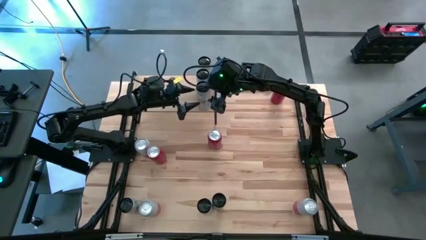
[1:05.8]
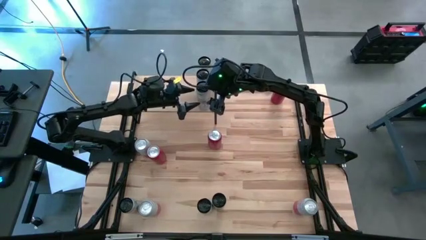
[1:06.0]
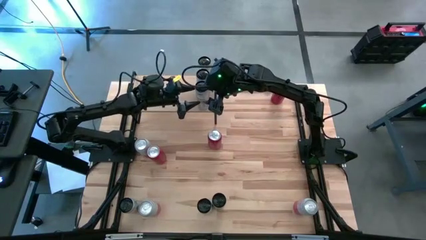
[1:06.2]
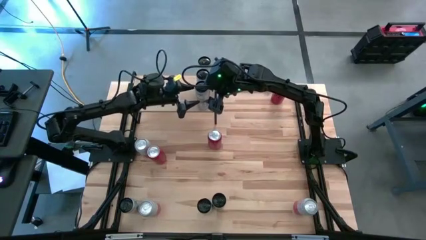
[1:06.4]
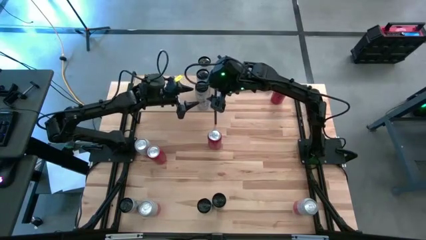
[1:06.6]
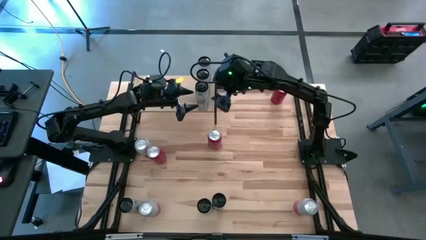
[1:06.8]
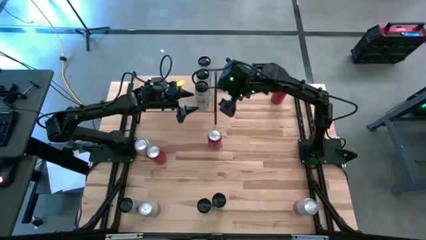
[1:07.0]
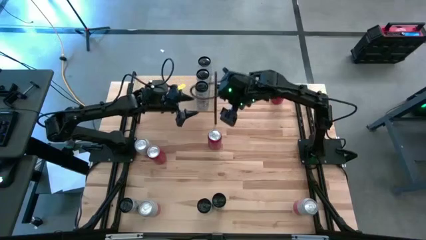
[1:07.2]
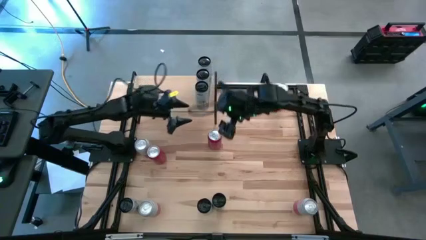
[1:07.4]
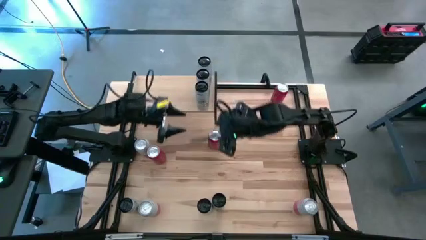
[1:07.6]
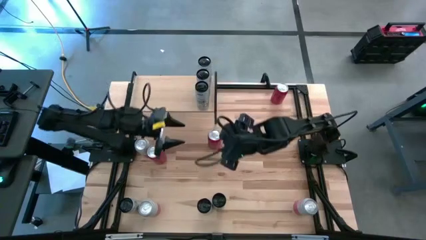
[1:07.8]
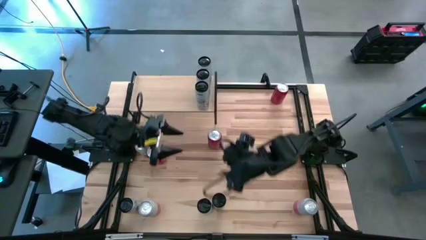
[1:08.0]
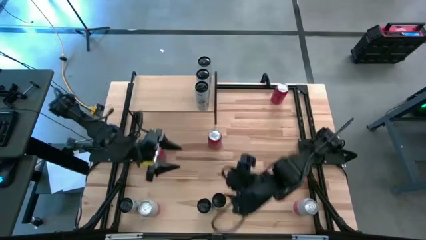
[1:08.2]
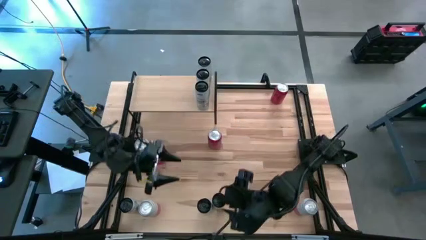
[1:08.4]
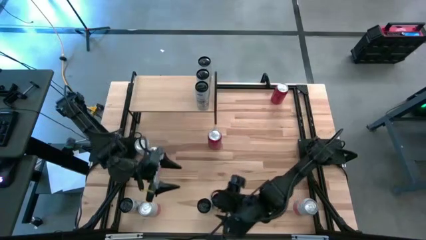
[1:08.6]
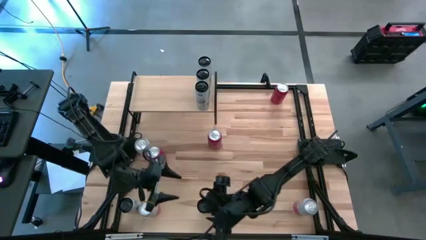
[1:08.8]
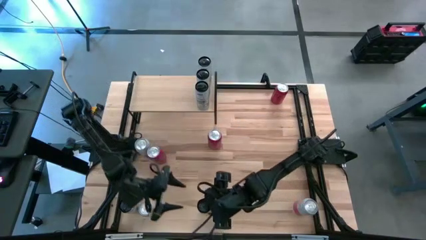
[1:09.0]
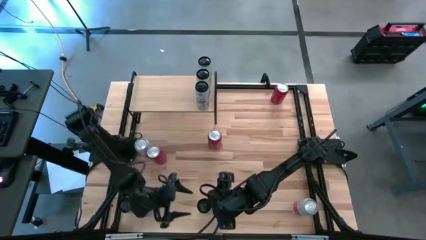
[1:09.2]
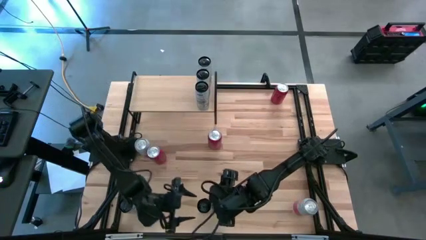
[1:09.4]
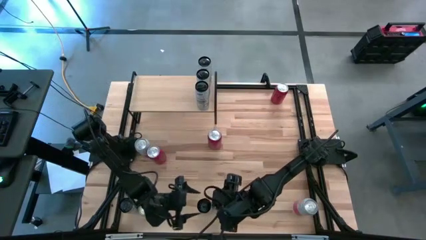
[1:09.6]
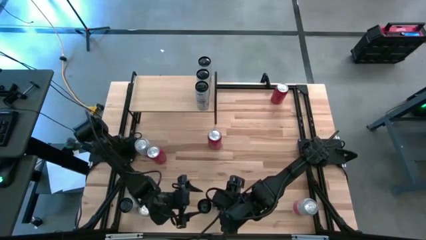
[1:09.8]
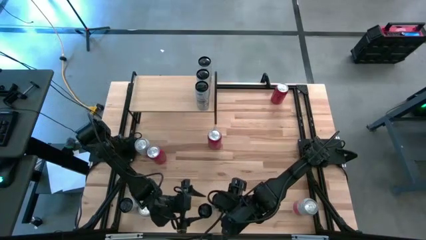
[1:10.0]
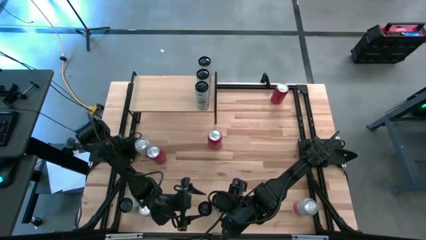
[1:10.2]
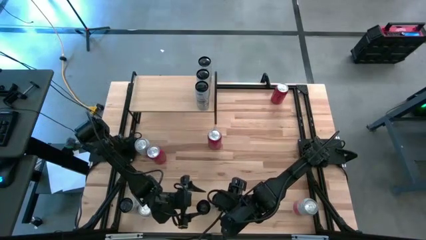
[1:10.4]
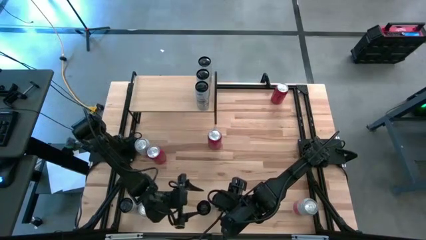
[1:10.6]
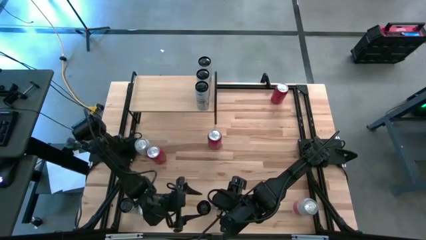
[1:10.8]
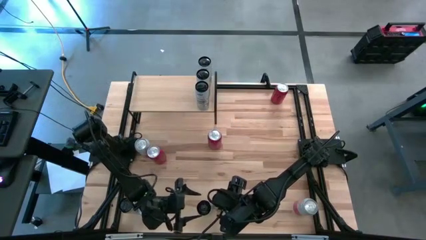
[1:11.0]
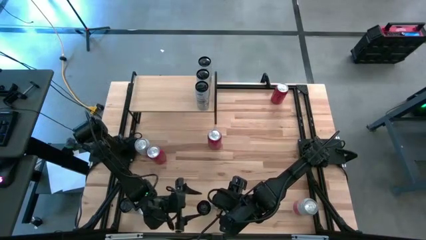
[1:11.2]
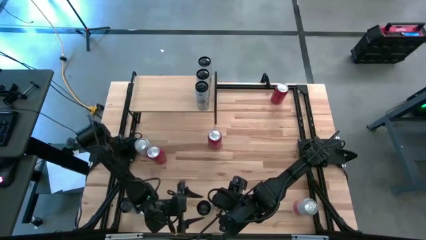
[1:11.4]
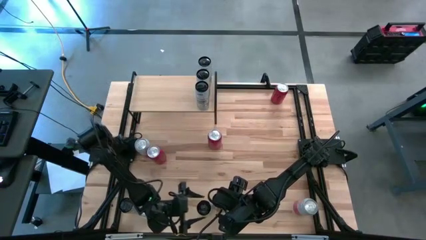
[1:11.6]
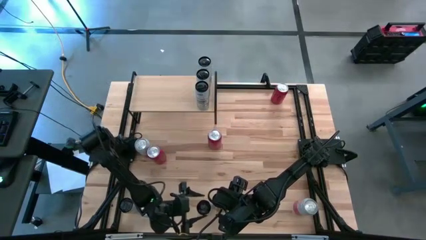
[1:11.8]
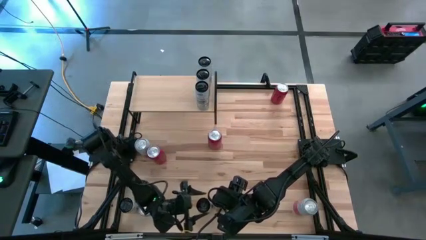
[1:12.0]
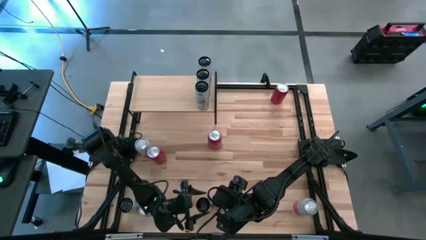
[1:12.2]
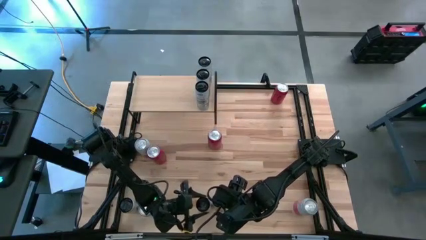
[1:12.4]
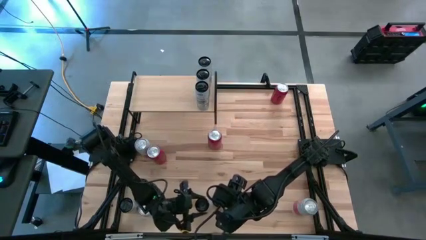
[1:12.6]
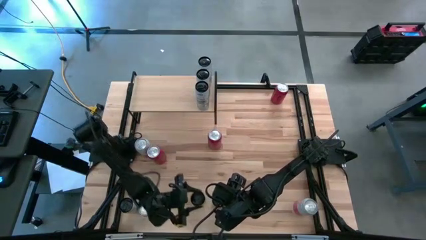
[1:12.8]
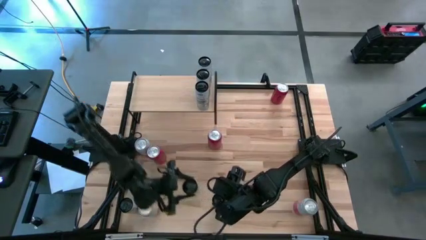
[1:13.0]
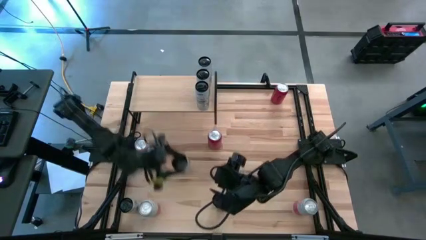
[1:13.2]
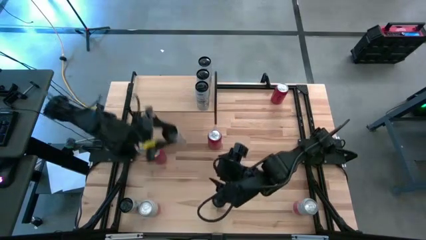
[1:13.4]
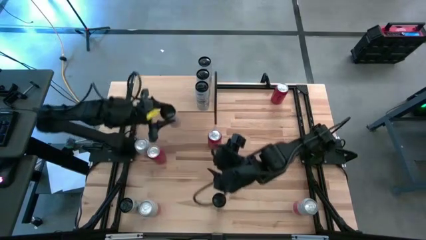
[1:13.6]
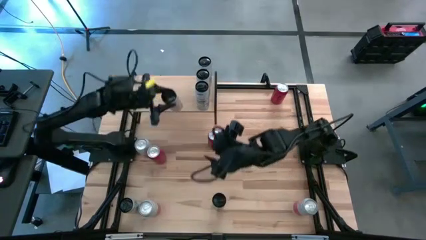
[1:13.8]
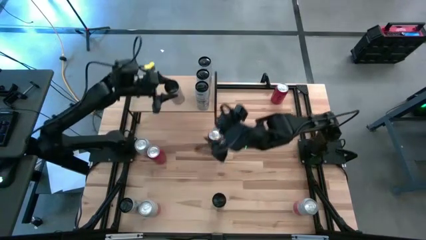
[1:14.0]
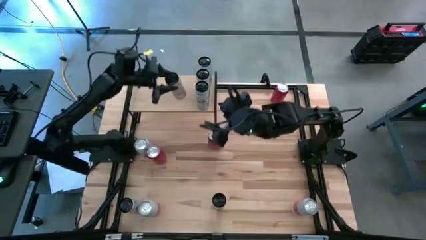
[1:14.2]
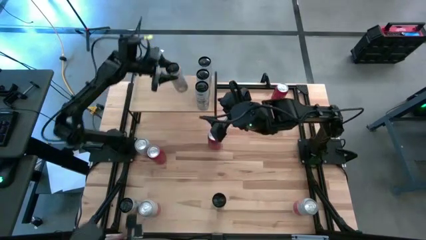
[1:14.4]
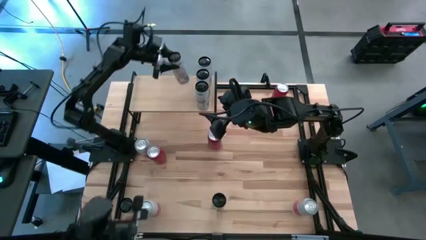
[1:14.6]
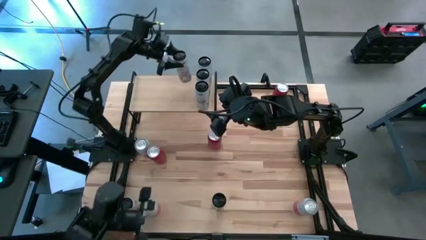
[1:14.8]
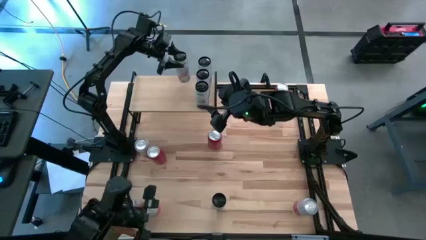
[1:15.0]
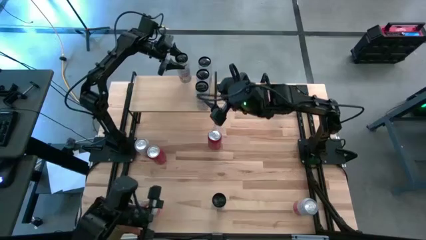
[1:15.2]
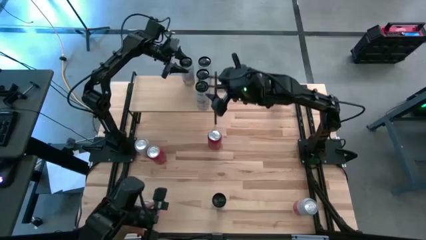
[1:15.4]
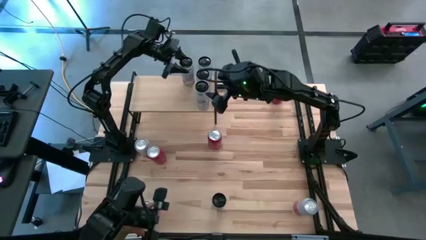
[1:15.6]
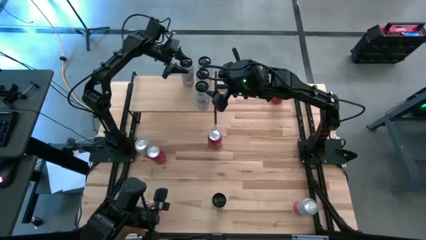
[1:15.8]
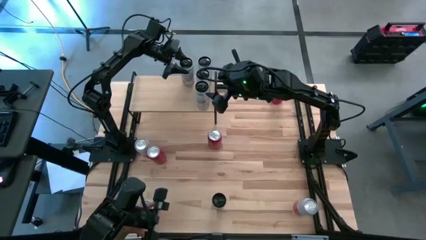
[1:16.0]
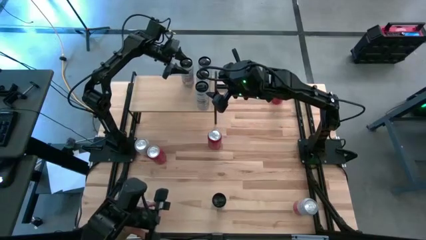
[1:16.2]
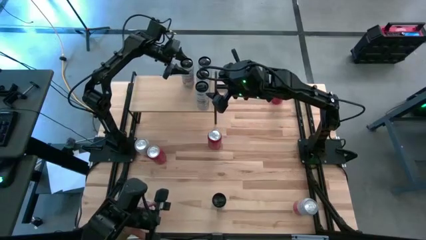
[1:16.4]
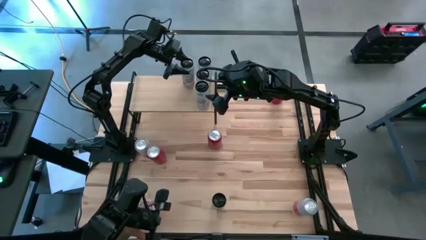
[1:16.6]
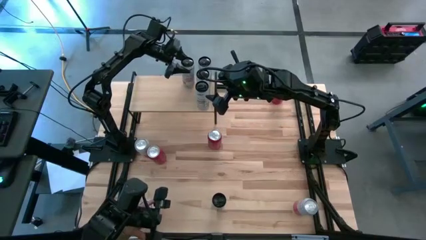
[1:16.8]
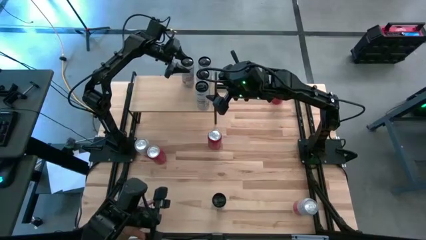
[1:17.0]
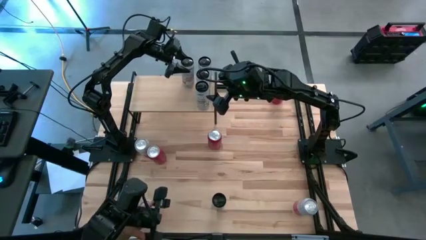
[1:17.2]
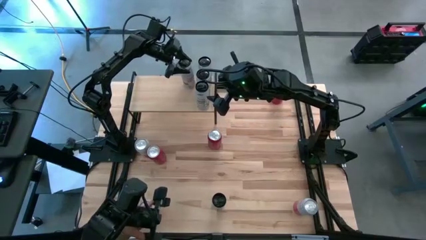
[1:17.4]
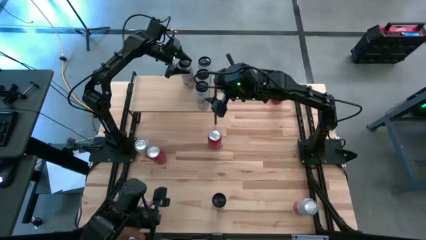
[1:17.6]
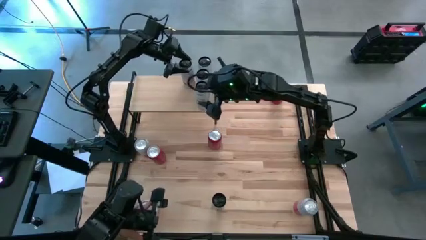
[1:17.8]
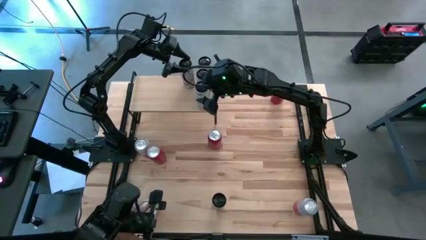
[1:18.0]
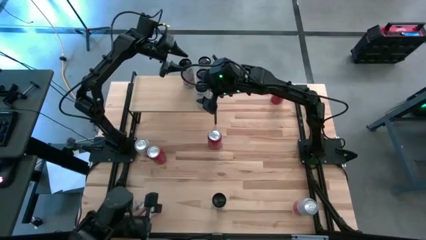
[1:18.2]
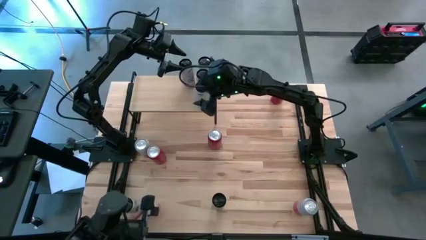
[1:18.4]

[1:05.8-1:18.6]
Task: Place canned beverage on shelf
Put the middle pink soda can on the shelf
